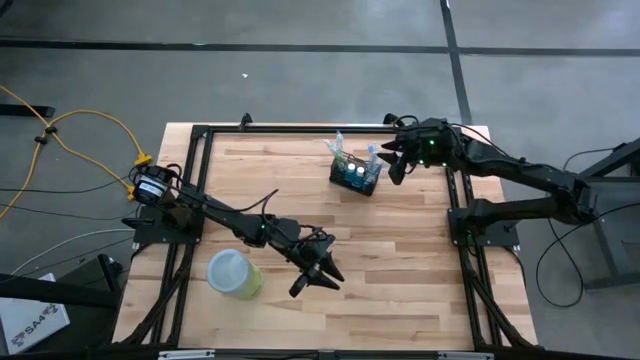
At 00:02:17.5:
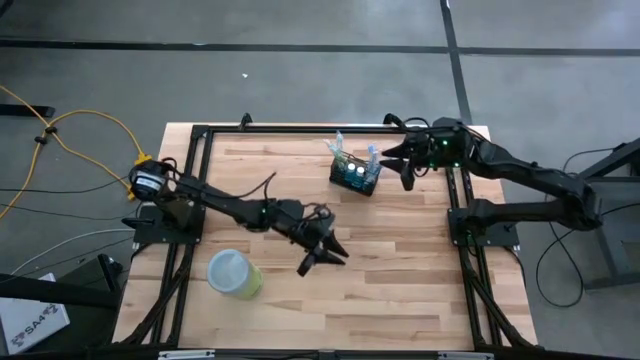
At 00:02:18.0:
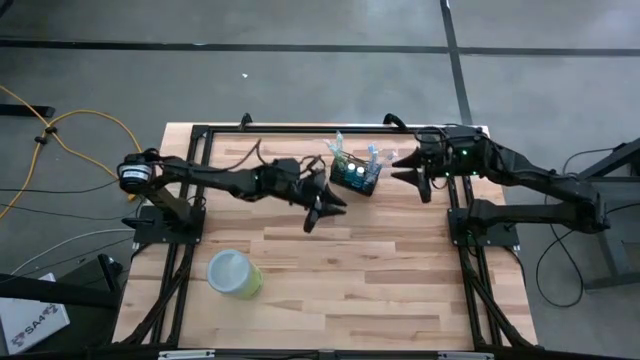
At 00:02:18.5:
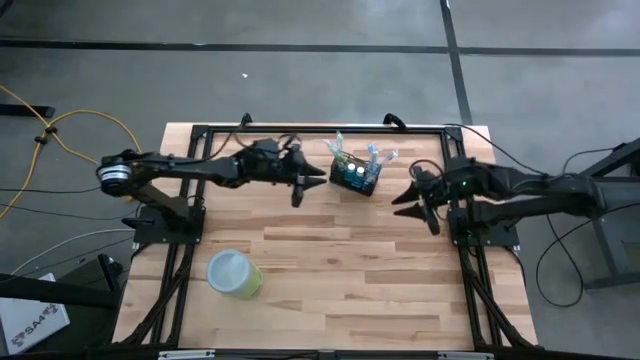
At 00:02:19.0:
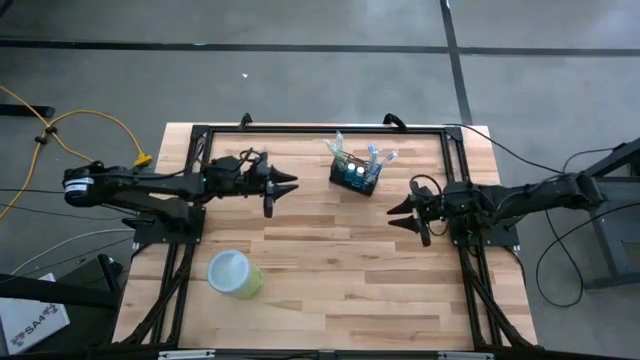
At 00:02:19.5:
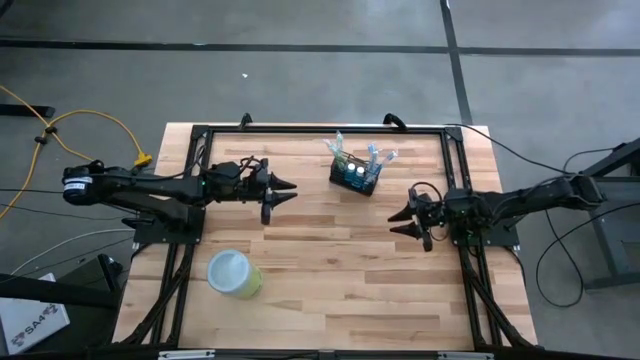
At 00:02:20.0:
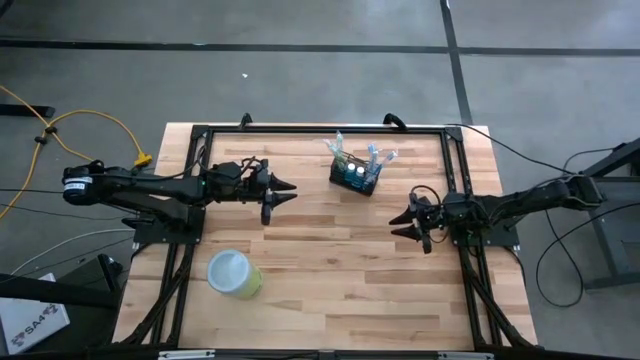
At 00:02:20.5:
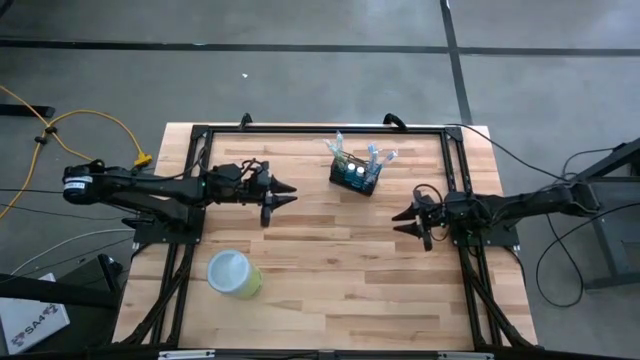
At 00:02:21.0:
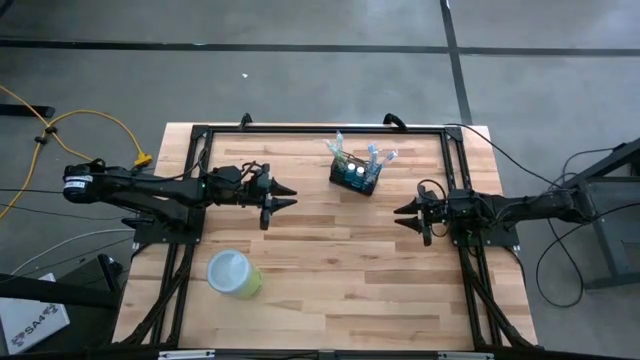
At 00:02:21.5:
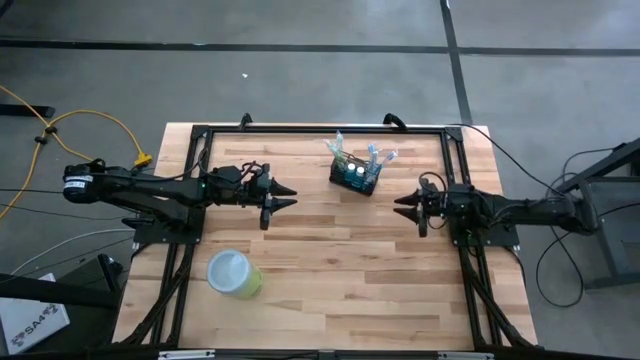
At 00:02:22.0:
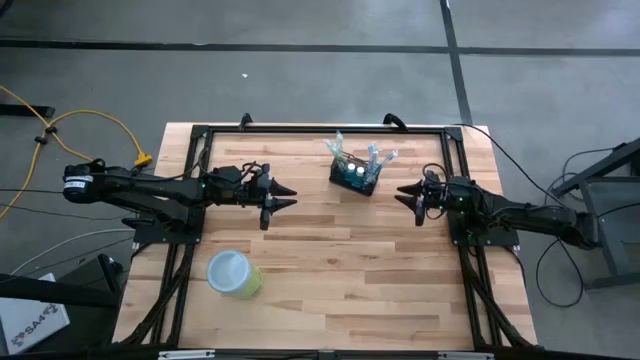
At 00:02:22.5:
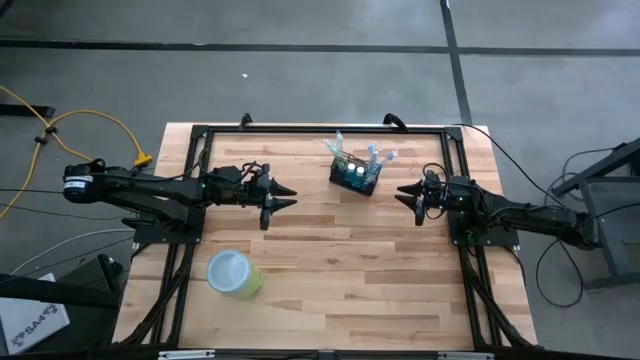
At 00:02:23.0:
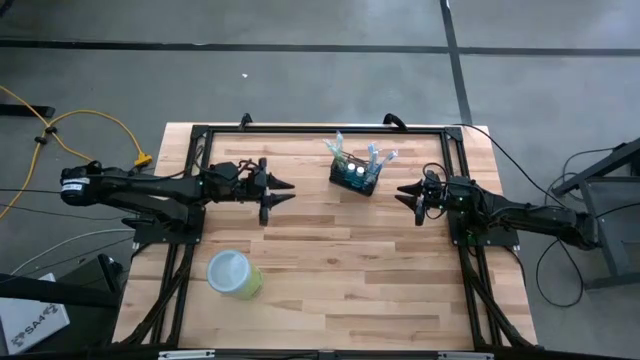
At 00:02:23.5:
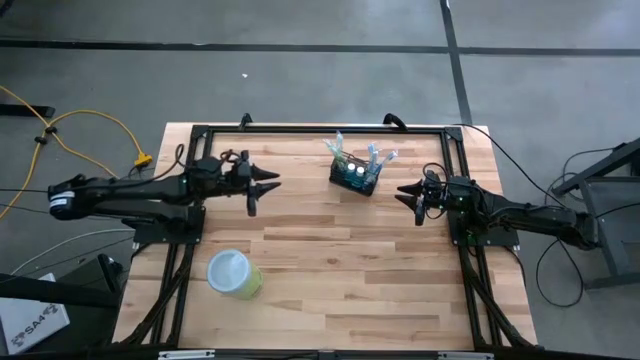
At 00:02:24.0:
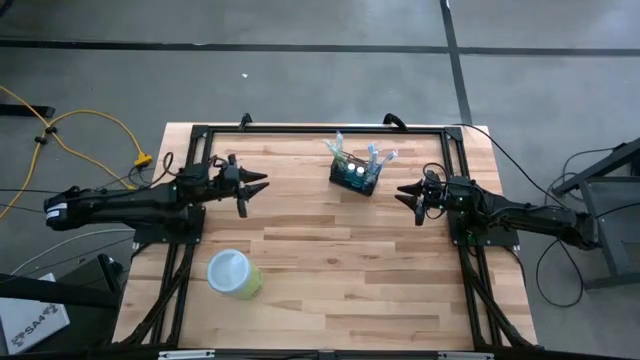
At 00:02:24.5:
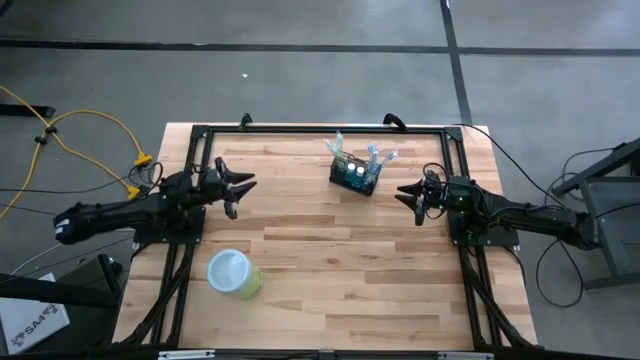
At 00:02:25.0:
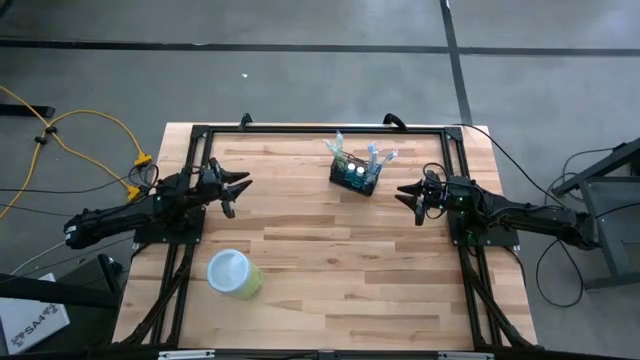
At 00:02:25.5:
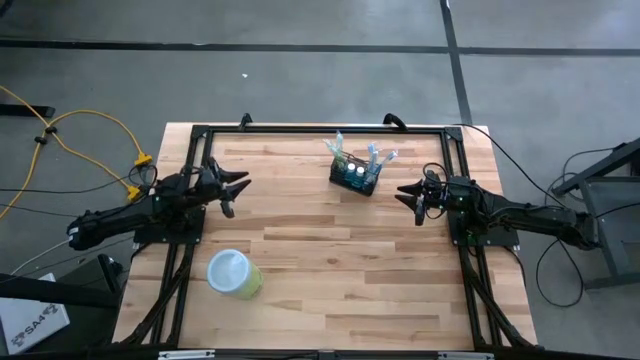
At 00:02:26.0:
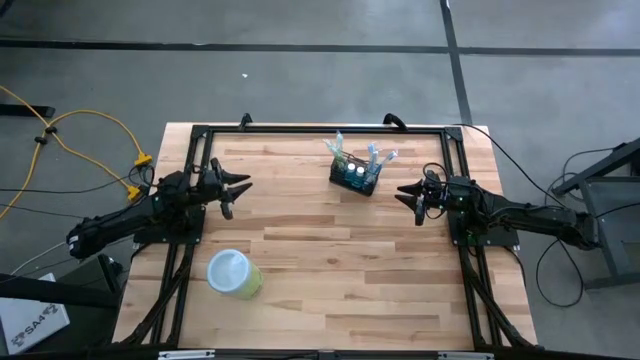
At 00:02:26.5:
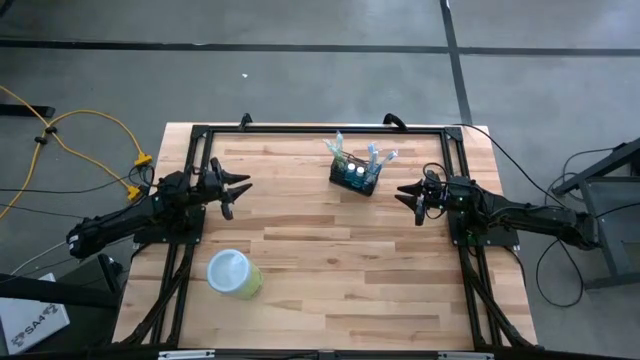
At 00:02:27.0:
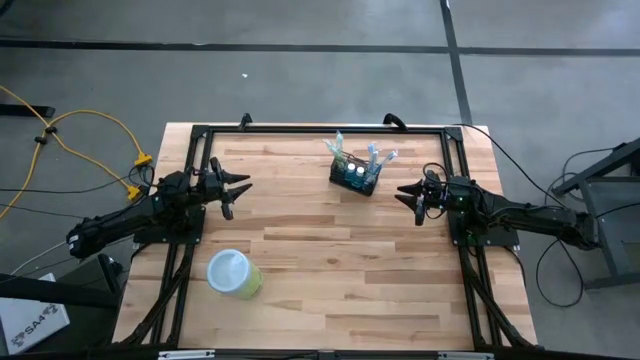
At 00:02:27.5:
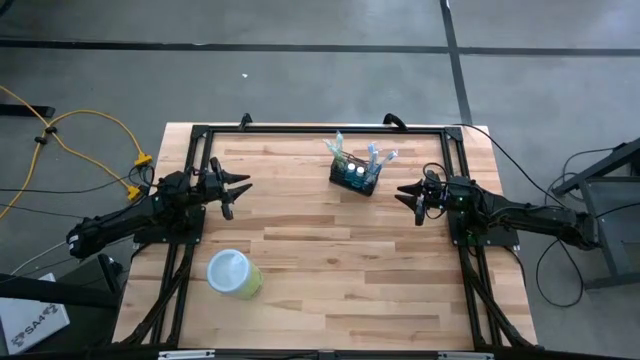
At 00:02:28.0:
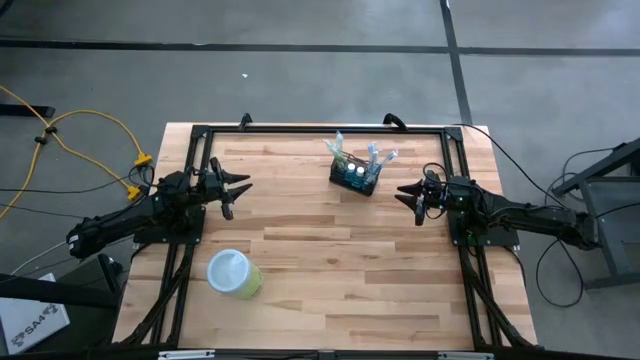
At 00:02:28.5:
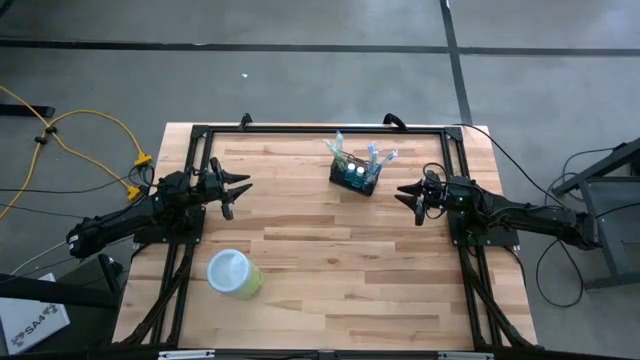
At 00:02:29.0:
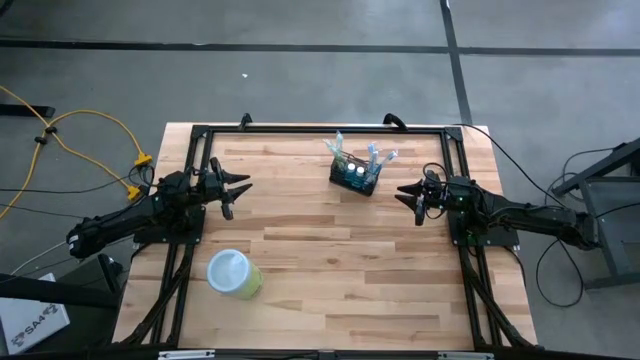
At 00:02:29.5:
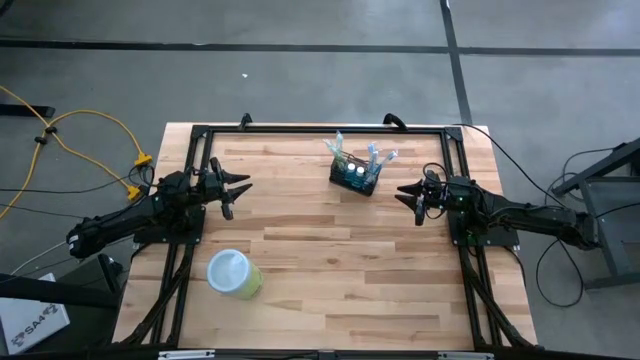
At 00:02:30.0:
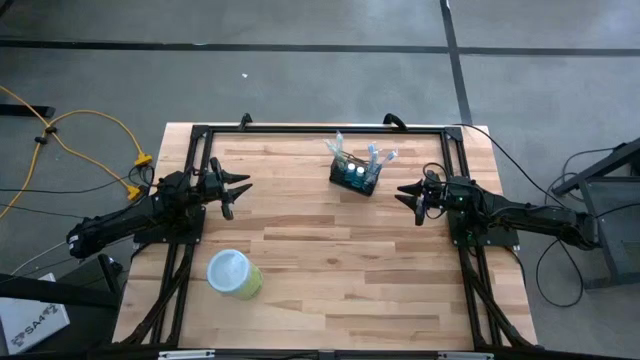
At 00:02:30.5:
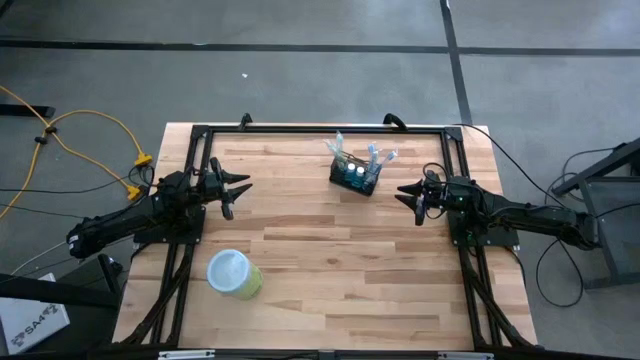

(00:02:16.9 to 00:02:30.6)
Task: Pick & Place toothbrushing station
Return to Home Position

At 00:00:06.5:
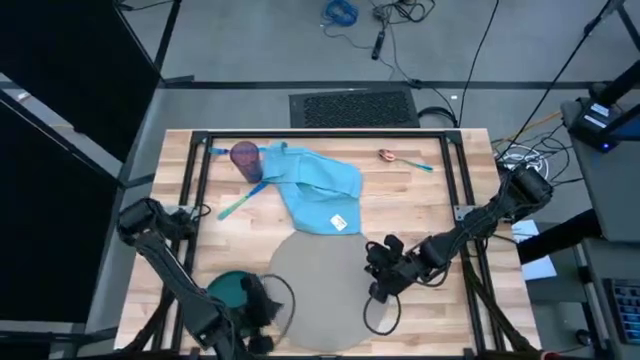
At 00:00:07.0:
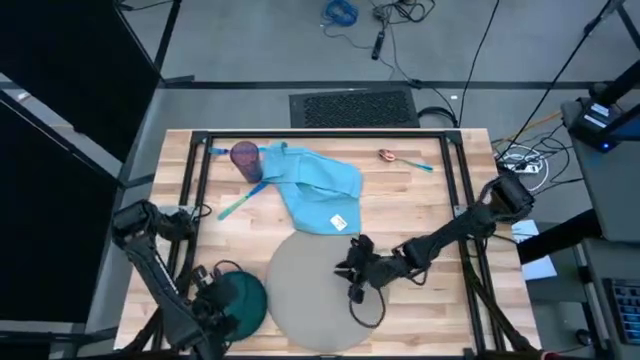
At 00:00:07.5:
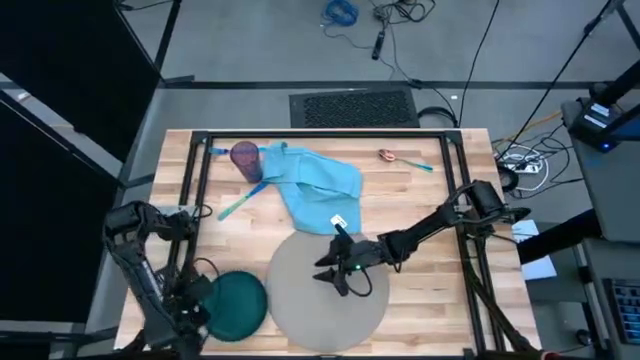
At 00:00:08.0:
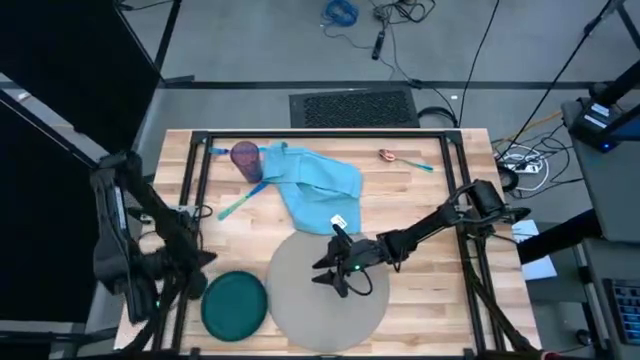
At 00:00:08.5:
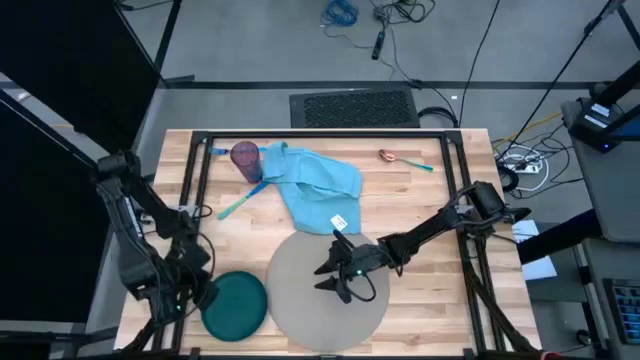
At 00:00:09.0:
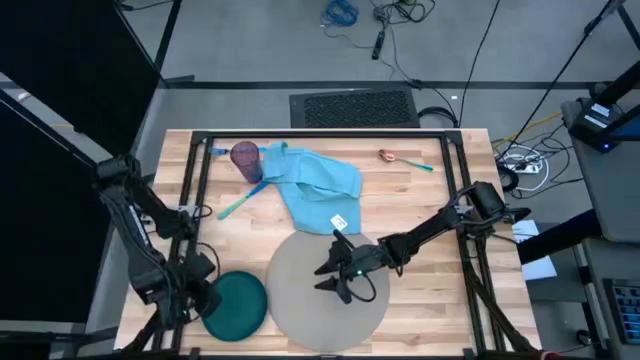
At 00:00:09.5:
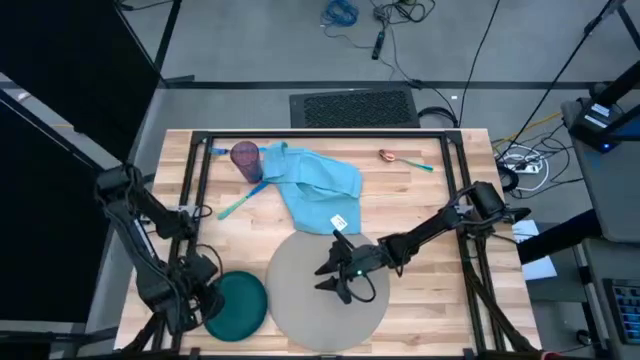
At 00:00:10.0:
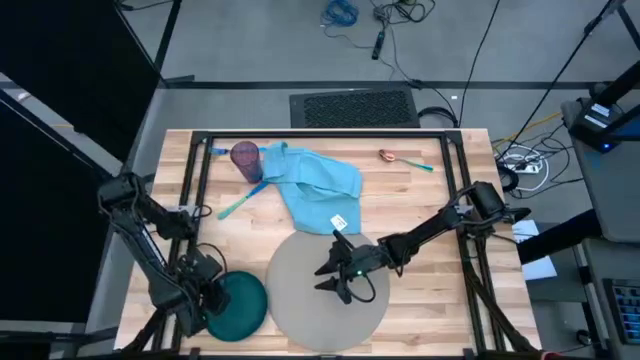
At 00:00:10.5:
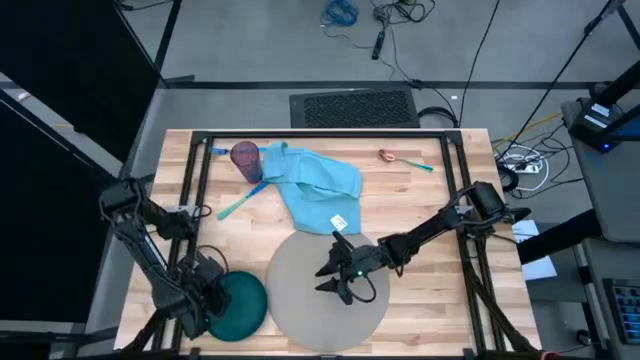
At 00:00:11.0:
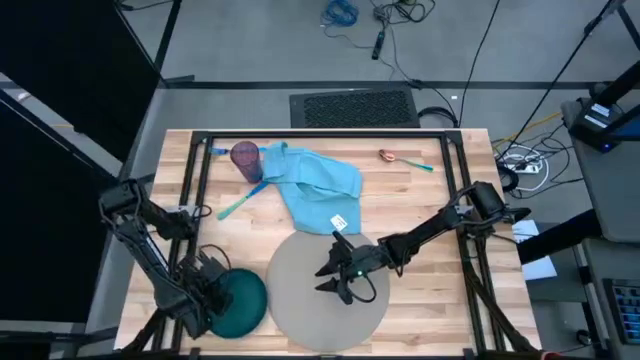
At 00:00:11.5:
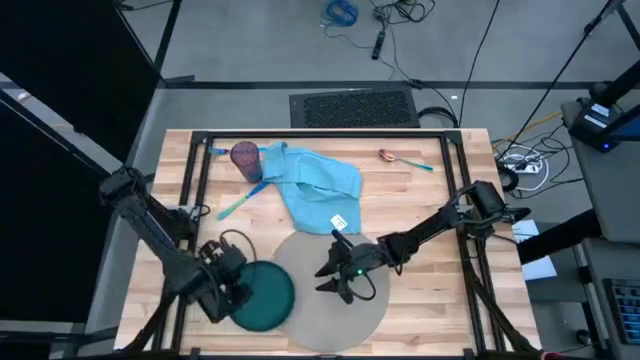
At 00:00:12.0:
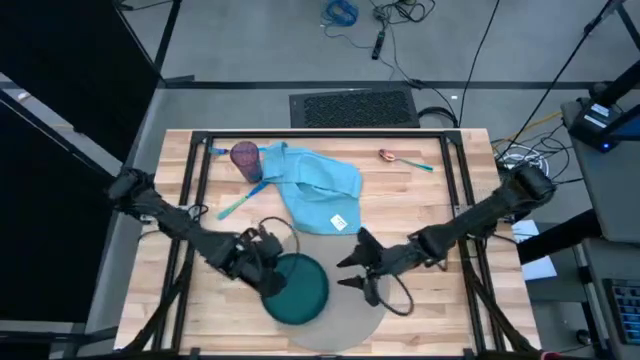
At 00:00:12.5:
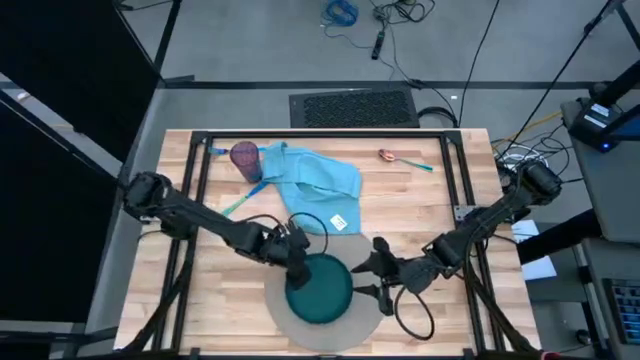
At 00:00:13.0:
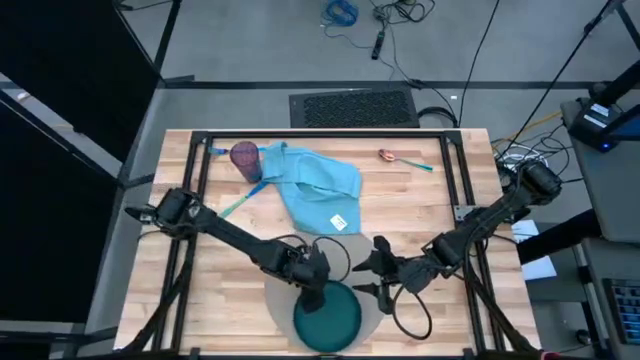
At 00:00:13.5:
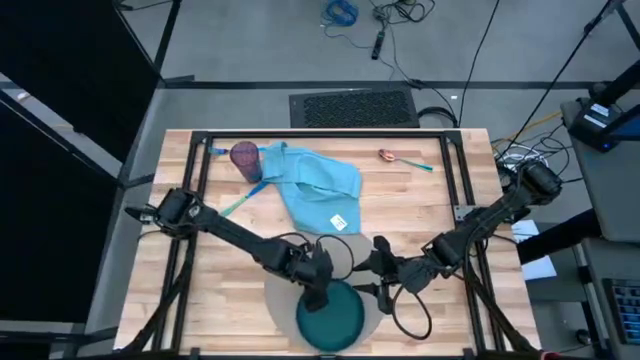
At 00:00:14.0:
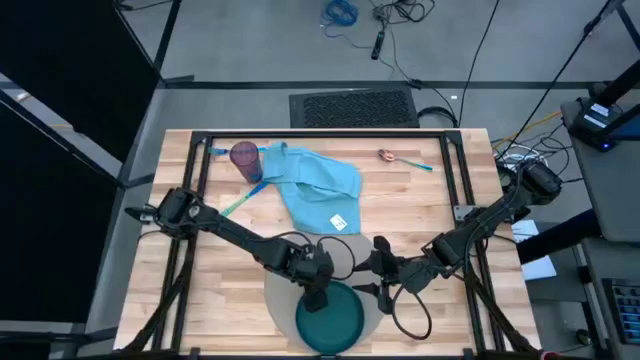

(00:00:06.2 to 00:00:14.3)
Task: Set table place
Put the dark green plate on the gray mat
